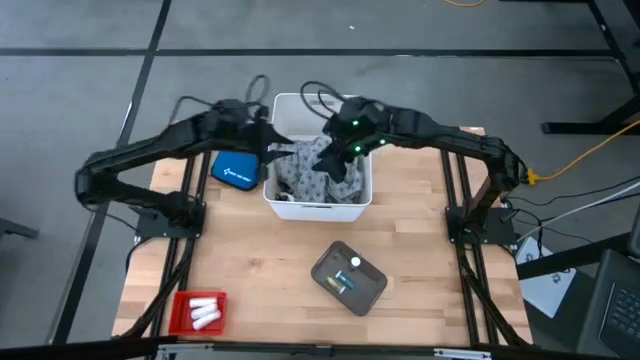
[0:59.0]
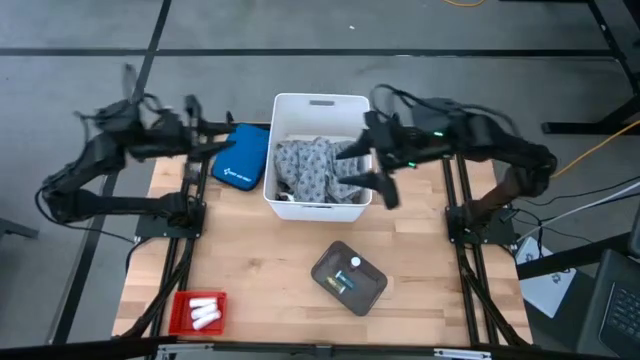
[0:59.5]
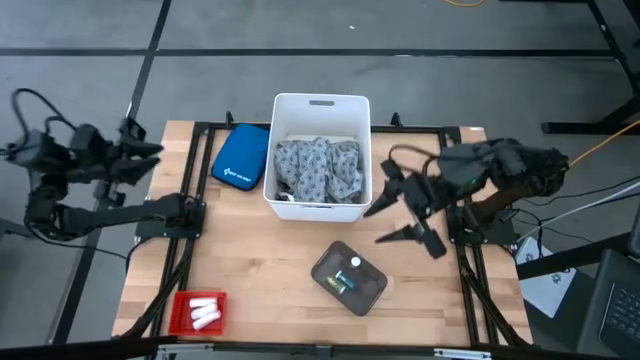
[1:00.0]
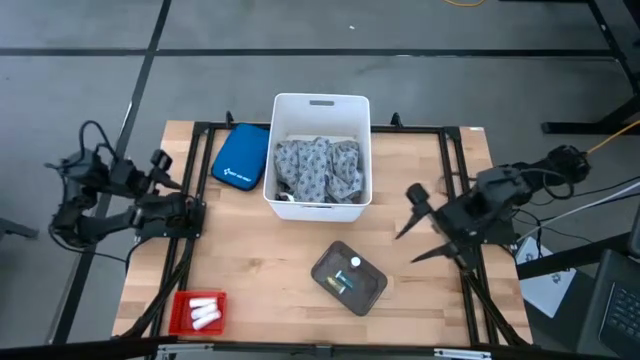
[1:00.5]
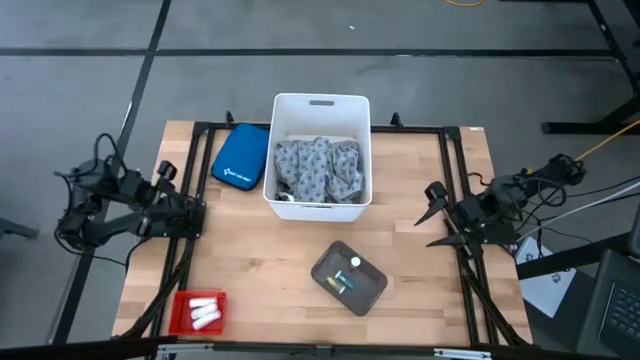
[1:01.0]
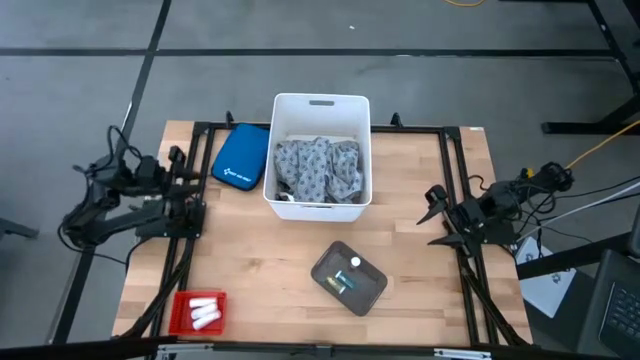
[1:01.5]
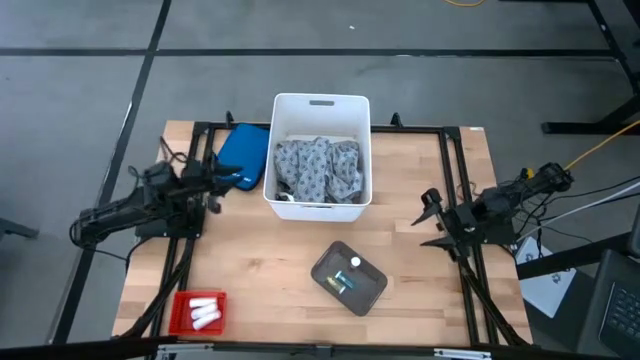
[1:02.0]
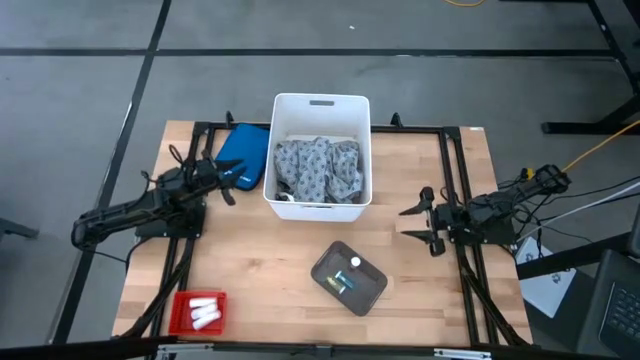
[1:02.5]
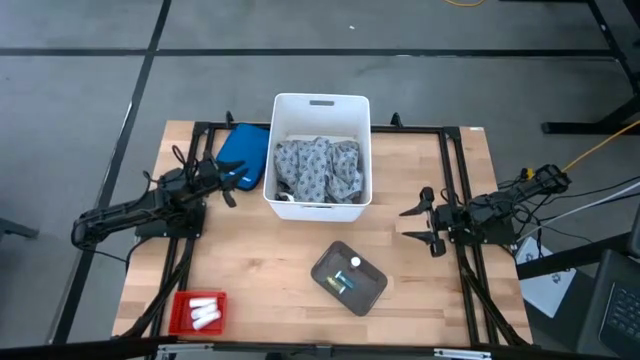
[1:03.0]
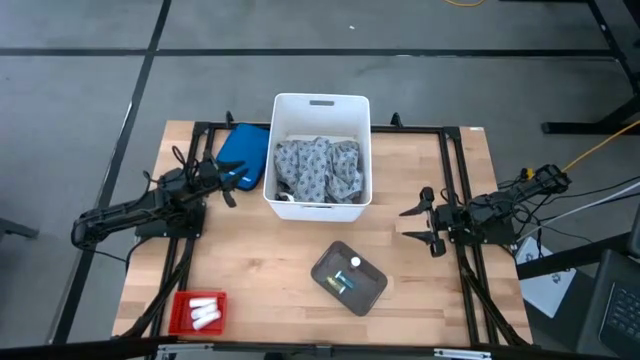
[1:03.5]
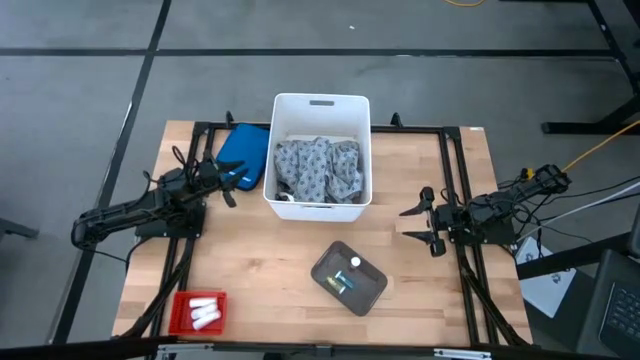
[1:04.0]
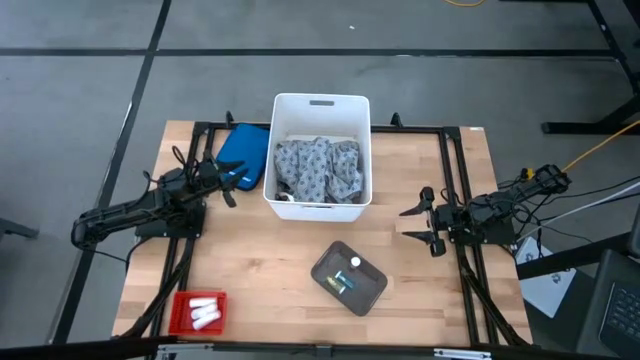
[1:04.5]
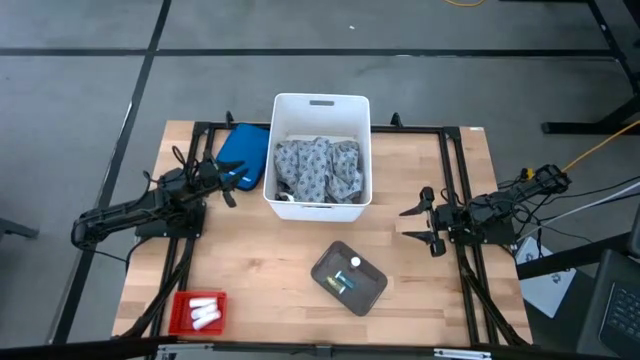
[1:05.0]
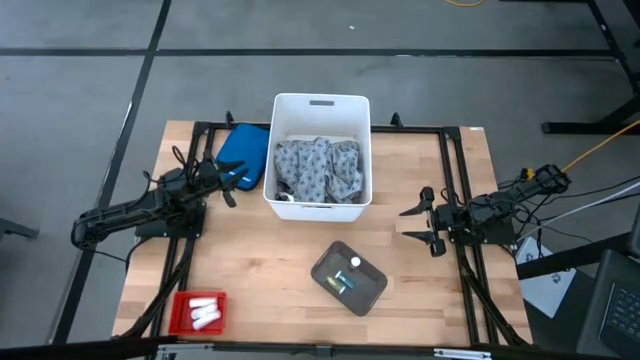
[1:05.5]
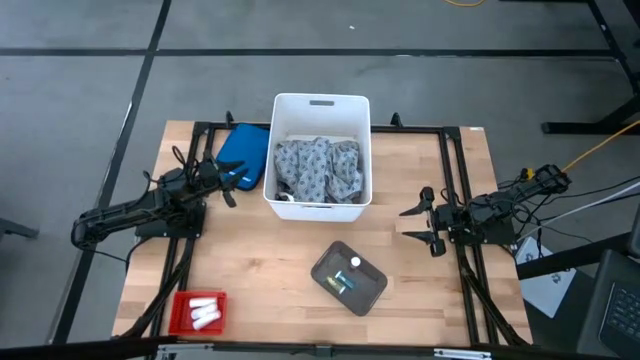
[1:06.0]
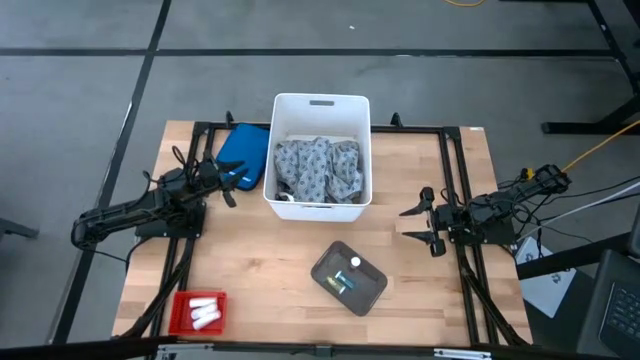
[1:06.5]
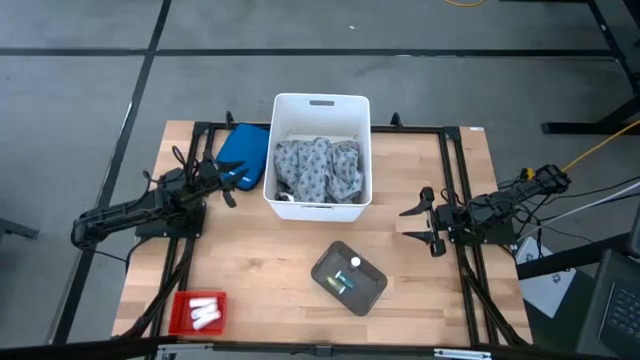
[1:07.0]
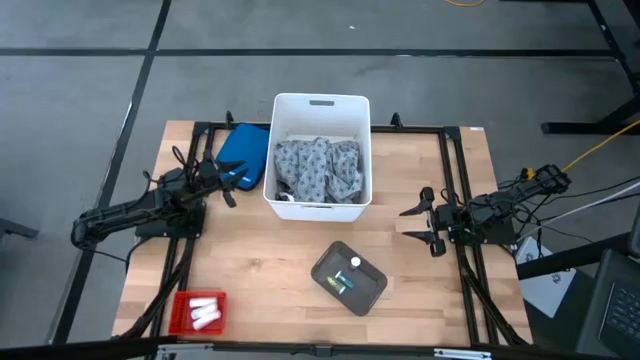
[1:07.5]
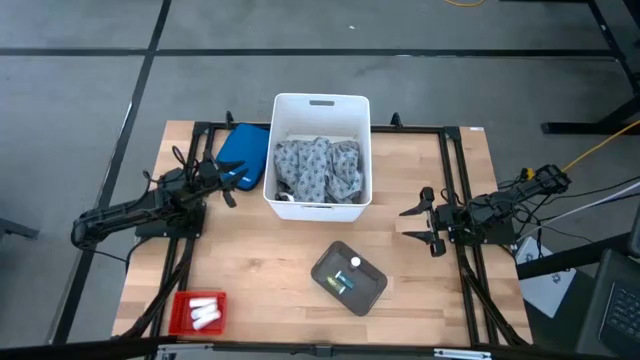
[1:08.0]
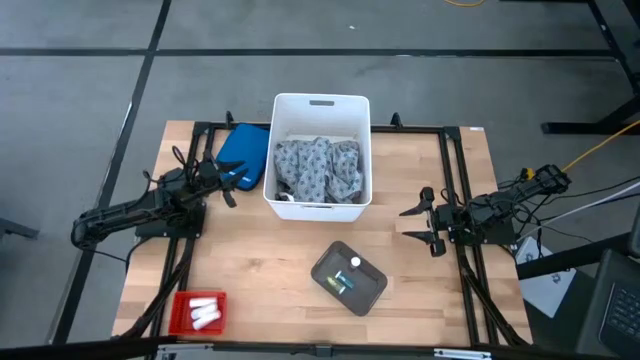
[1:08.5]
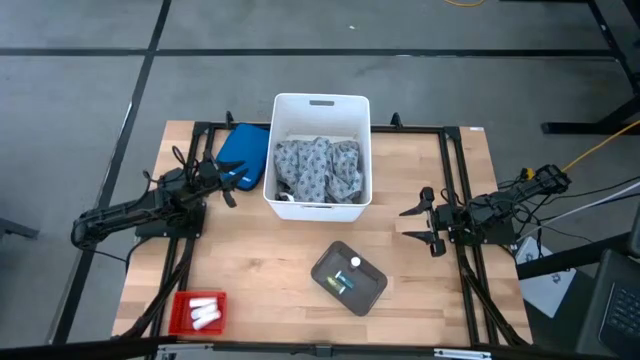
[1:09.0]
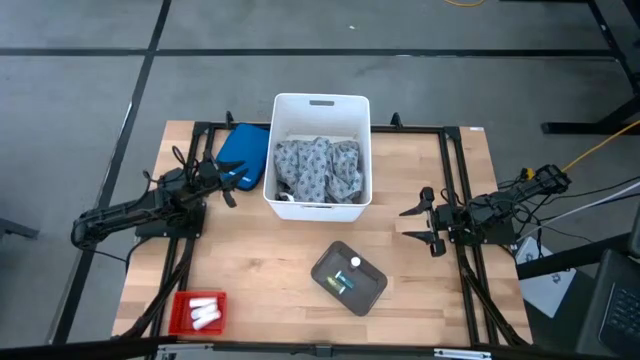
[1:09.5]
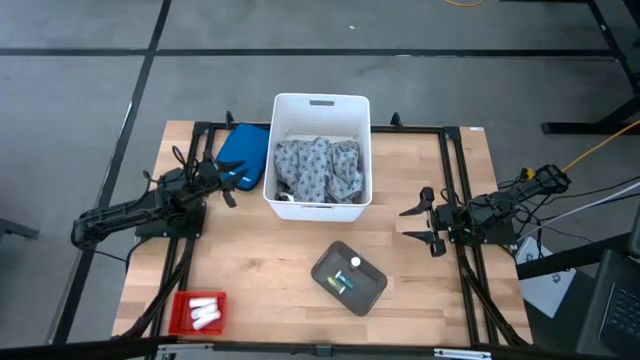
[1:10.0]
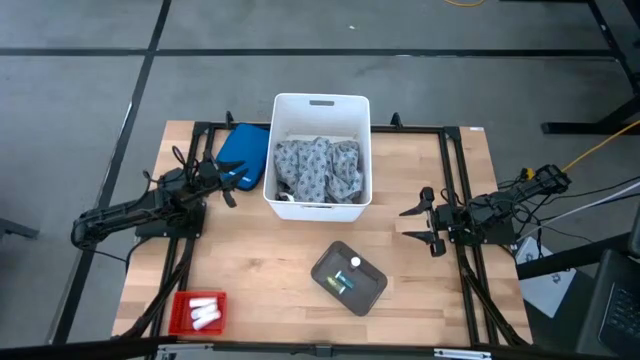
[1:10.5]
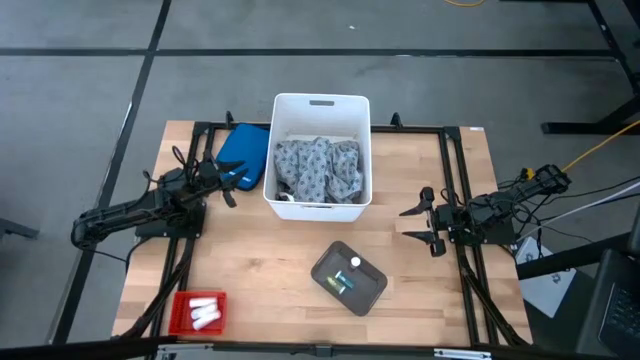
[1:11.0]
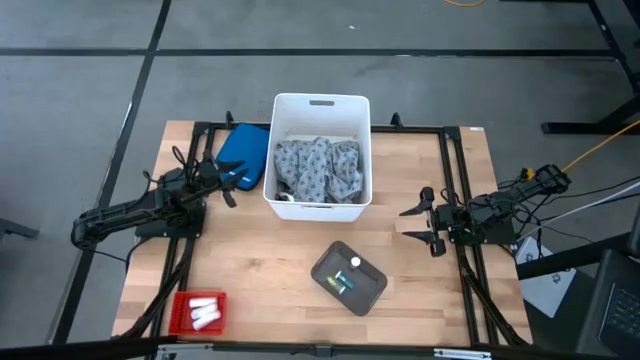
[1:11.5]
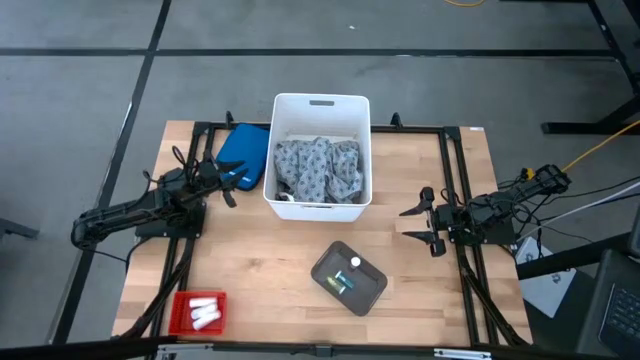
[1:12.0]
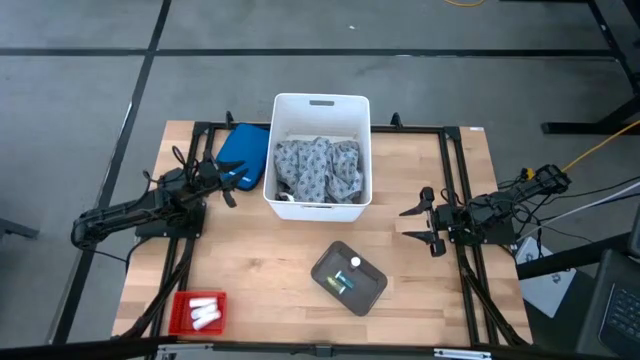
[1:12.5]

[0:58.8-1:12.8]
Task: Pick & place medical supplies in basket/bin
Return to Home Position

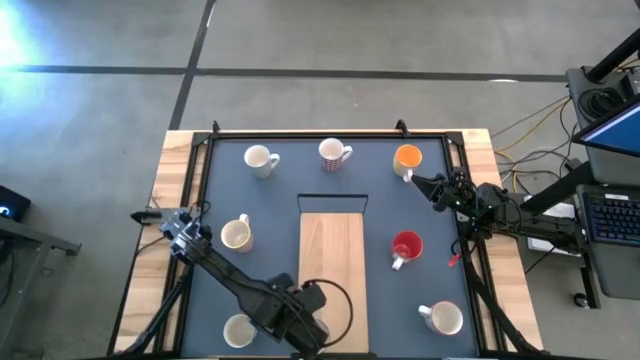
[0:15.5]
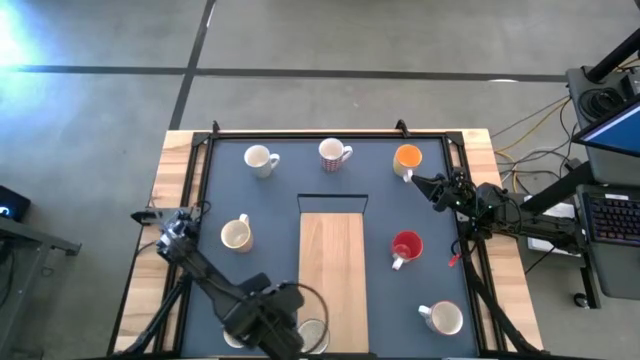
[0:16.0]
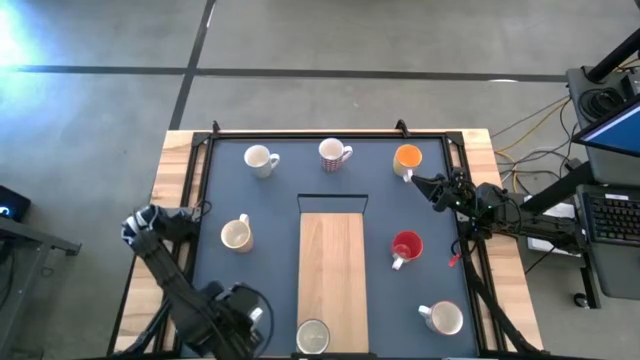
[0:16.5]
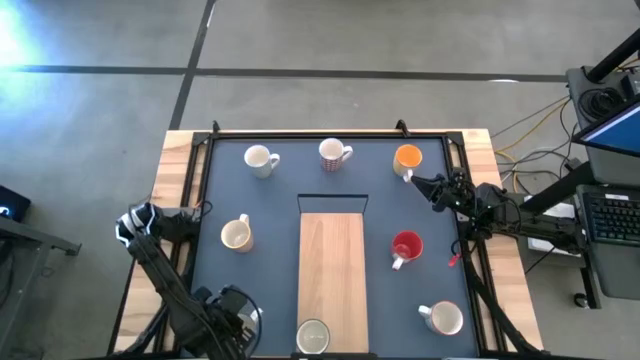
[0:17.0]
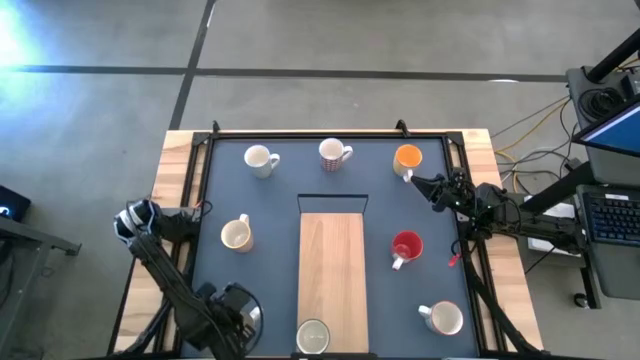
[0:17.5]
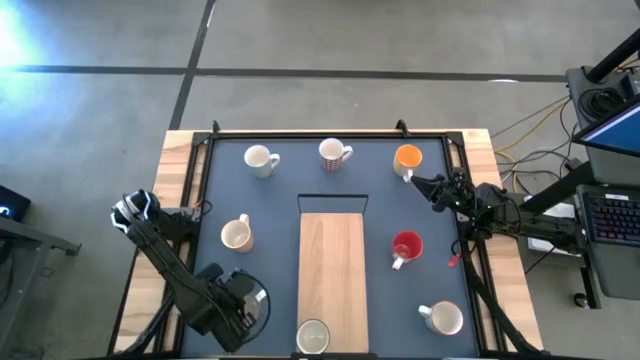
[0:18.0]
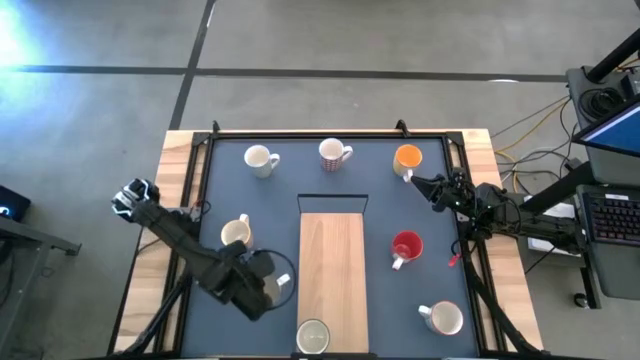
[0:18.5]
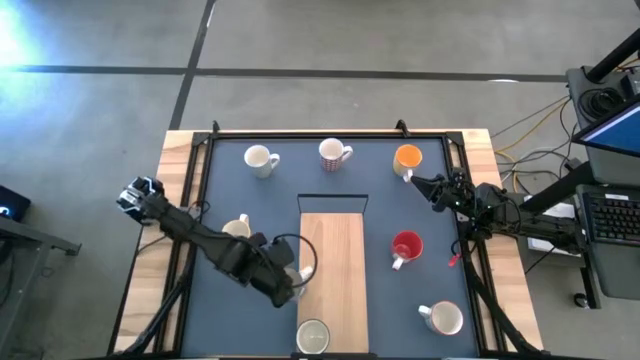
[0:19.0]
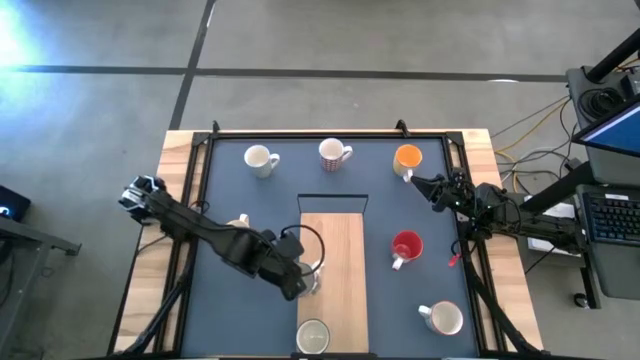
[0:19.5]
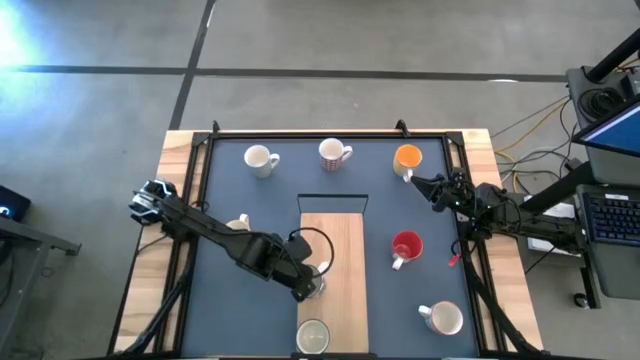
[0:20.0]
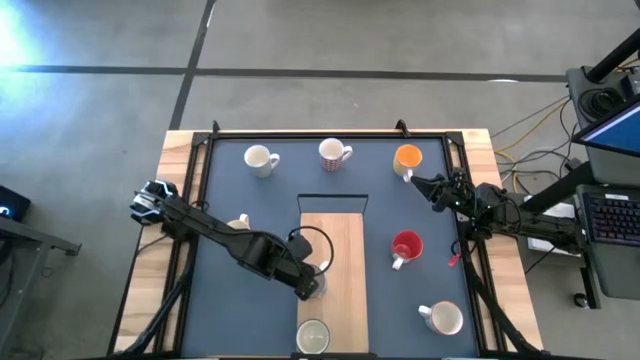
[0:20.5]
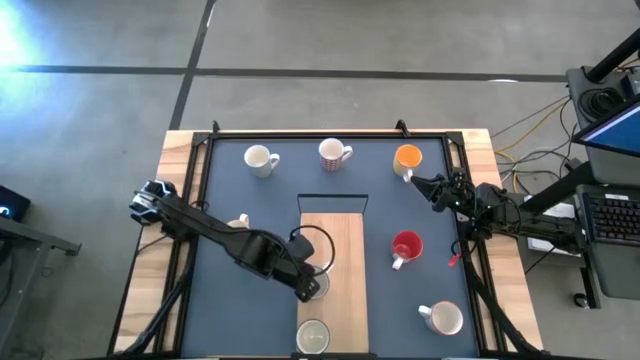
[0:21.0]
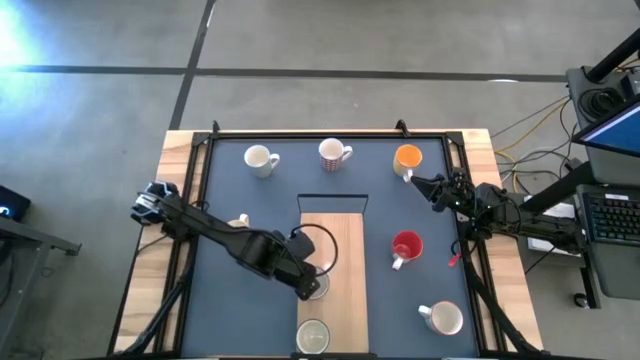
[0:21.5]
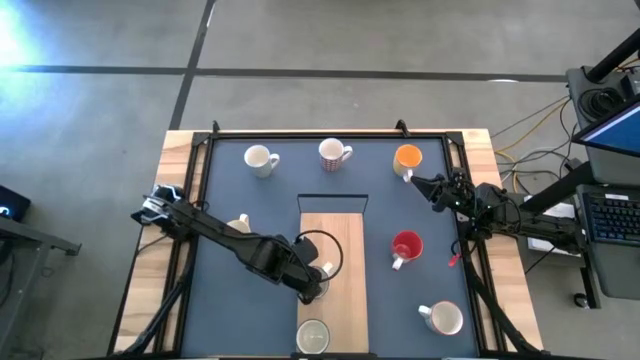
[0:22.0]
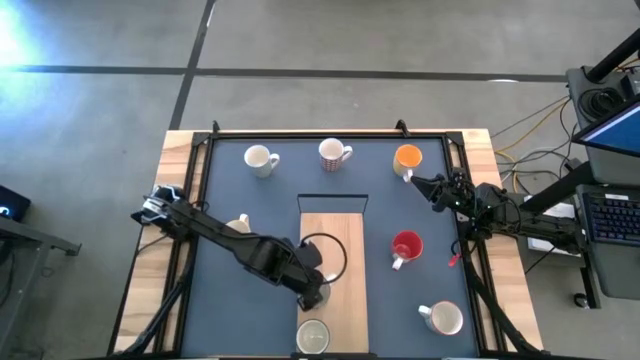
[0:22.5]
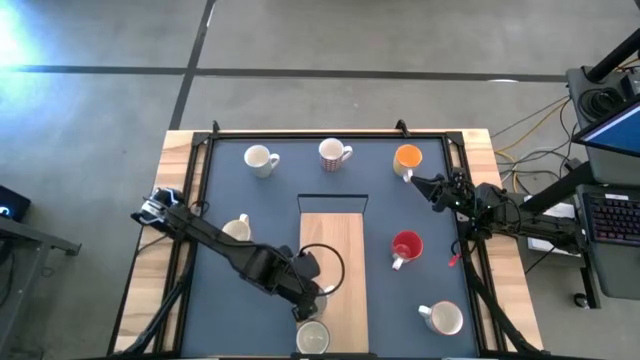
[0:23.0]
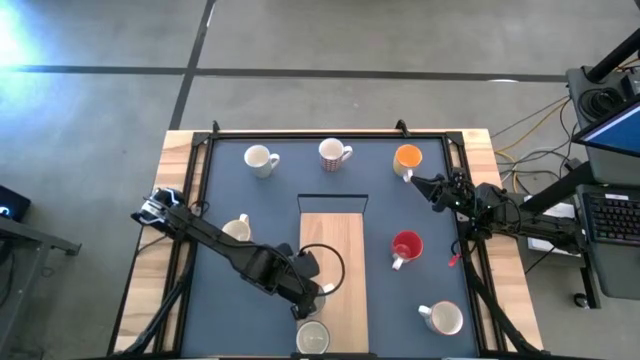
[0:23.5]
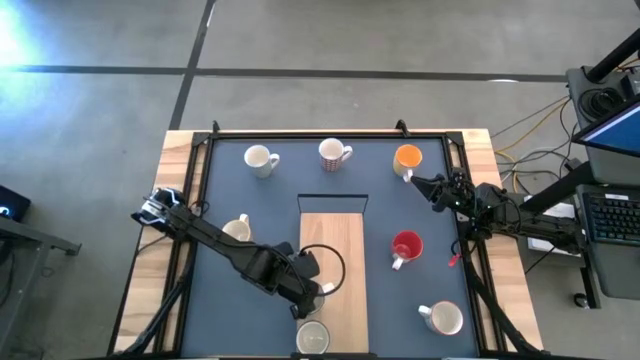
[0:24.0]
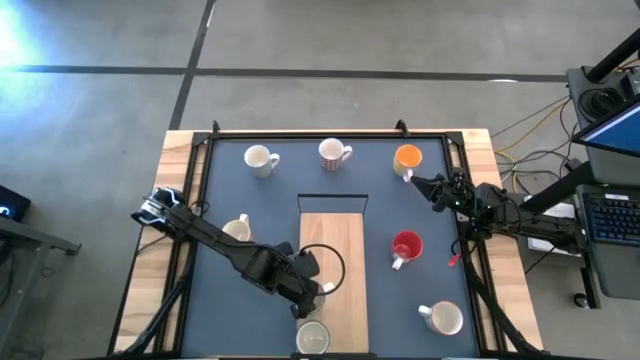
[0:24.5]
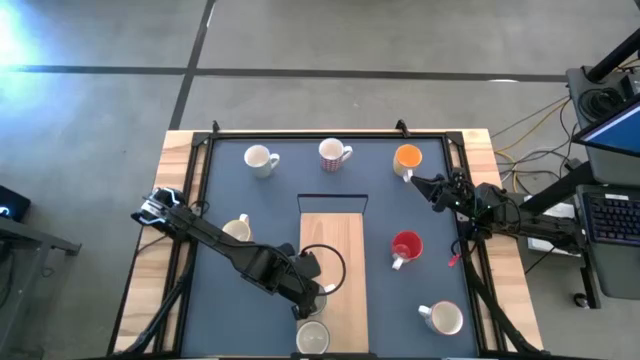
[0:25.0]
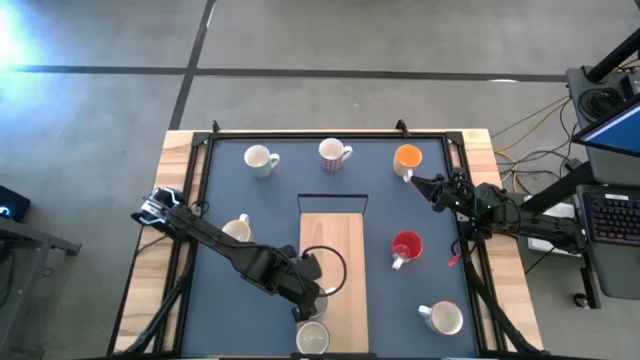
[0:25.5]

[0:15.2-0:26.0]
Task: Place coffee mugs
Put the blue mug on the shelf
